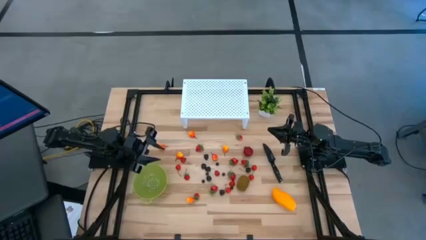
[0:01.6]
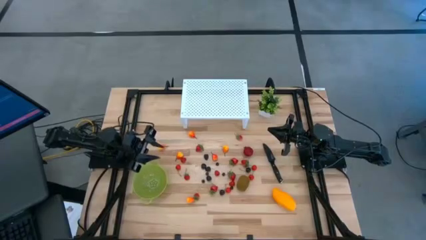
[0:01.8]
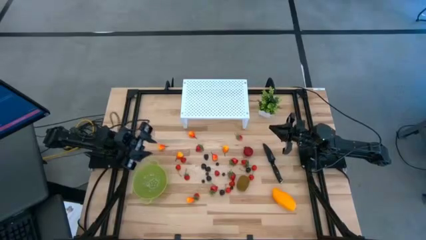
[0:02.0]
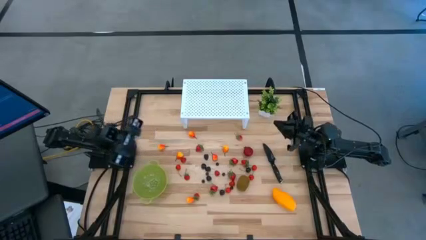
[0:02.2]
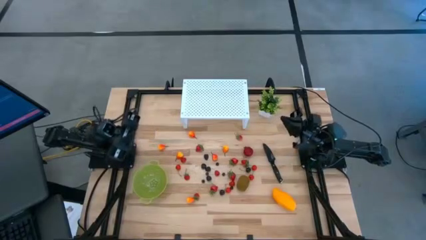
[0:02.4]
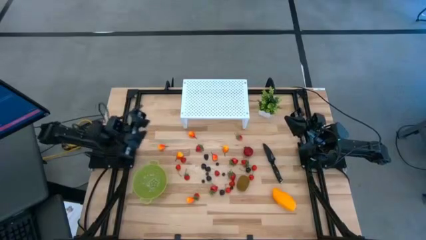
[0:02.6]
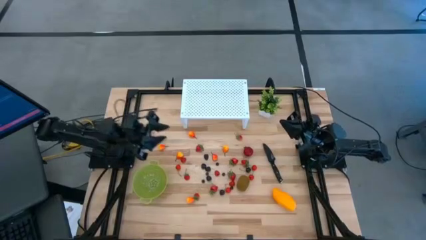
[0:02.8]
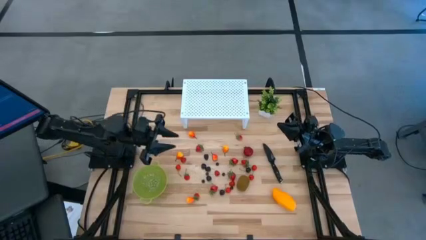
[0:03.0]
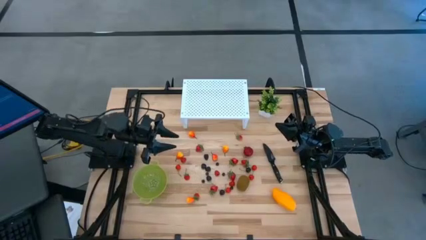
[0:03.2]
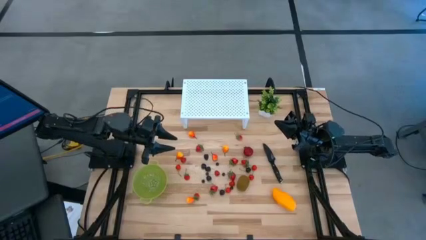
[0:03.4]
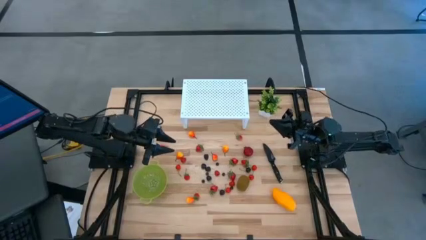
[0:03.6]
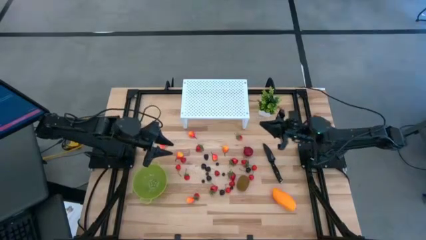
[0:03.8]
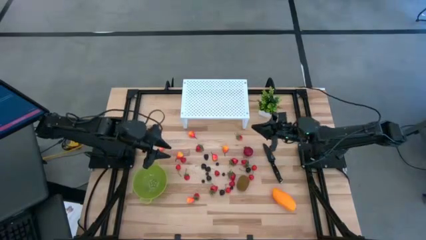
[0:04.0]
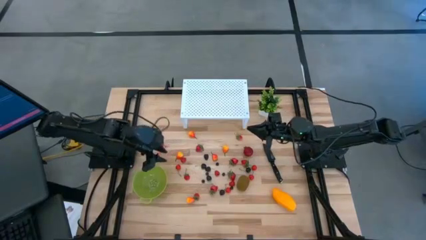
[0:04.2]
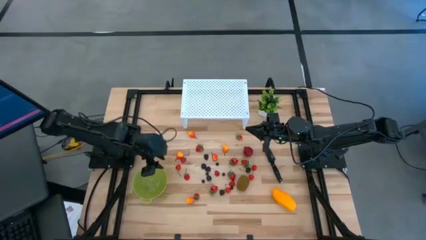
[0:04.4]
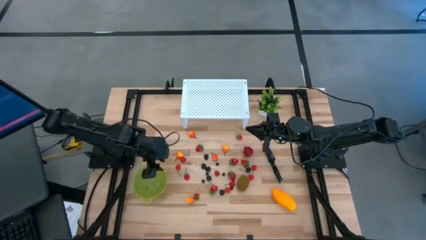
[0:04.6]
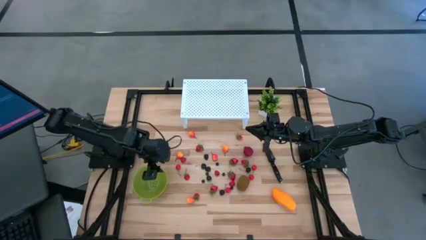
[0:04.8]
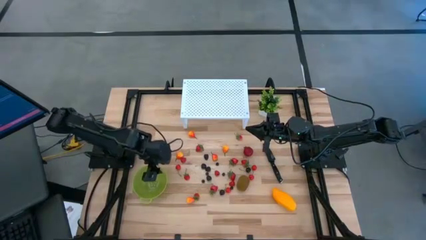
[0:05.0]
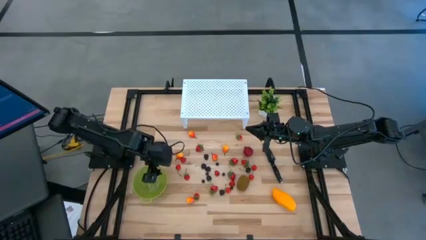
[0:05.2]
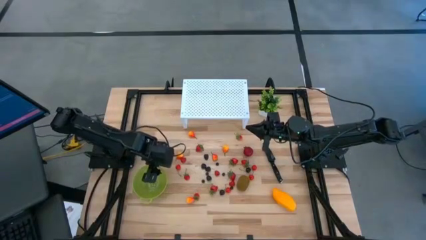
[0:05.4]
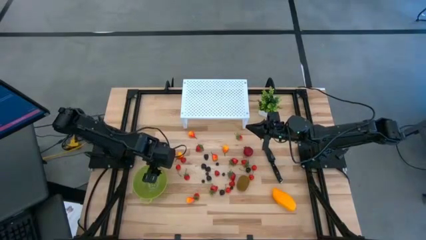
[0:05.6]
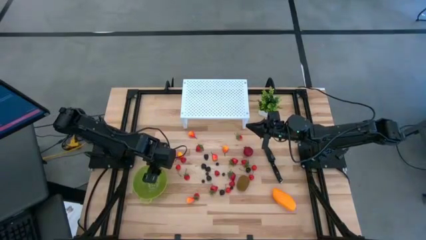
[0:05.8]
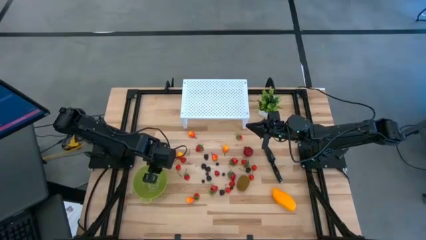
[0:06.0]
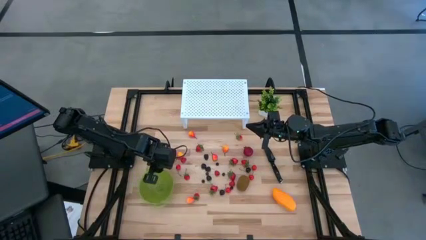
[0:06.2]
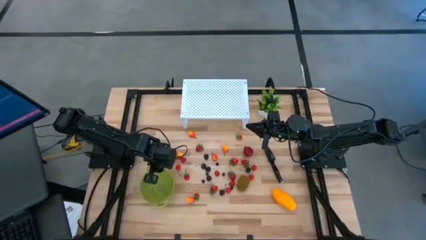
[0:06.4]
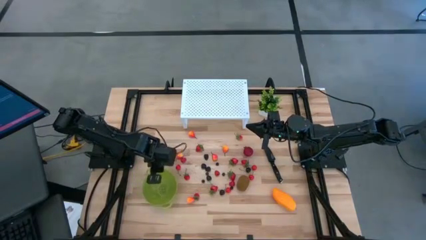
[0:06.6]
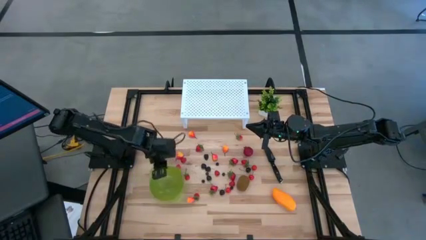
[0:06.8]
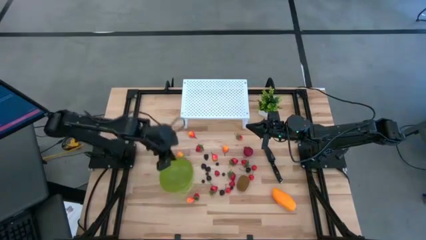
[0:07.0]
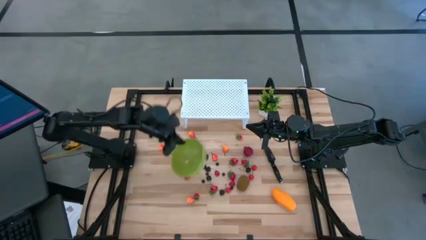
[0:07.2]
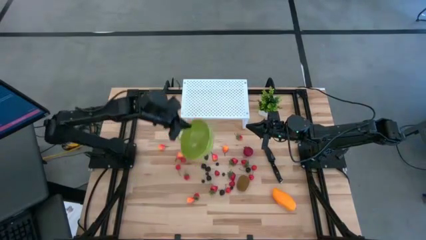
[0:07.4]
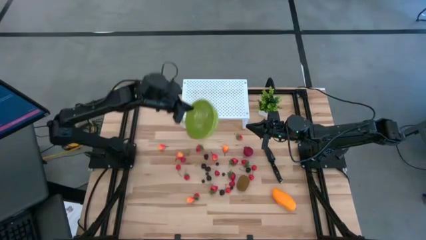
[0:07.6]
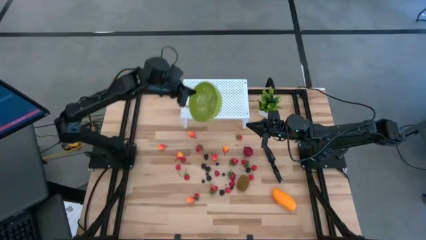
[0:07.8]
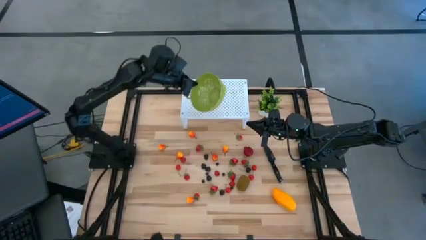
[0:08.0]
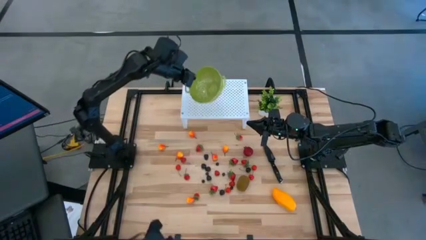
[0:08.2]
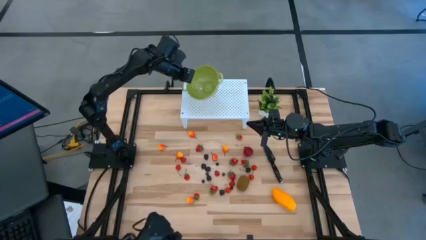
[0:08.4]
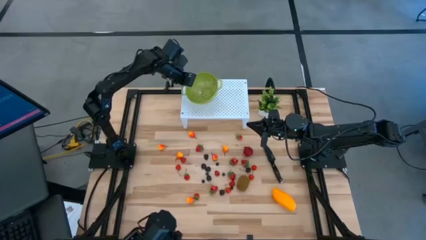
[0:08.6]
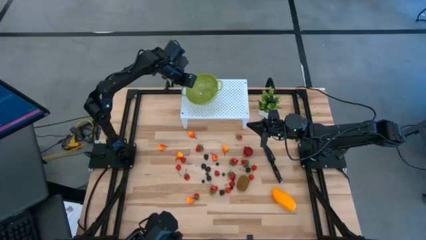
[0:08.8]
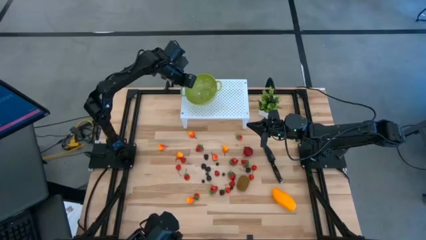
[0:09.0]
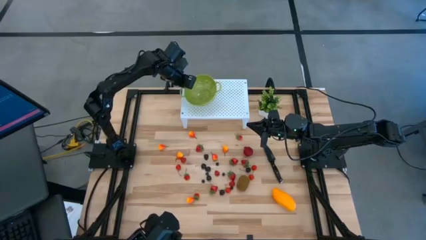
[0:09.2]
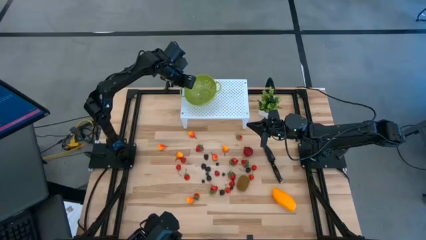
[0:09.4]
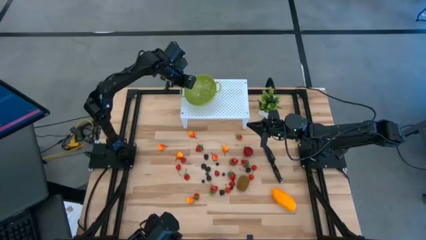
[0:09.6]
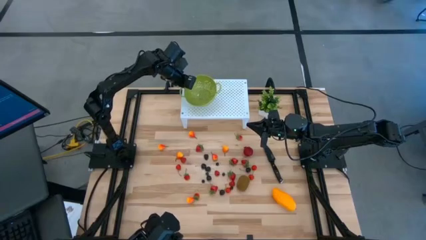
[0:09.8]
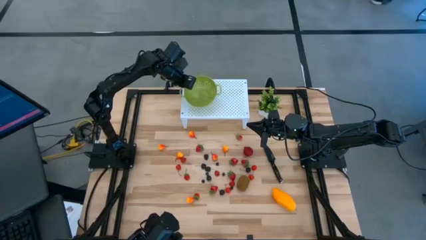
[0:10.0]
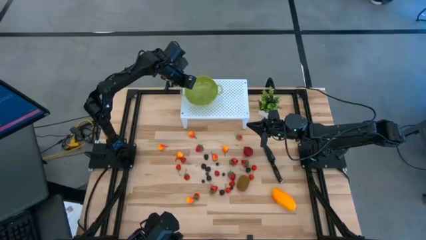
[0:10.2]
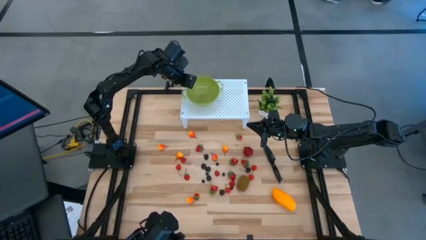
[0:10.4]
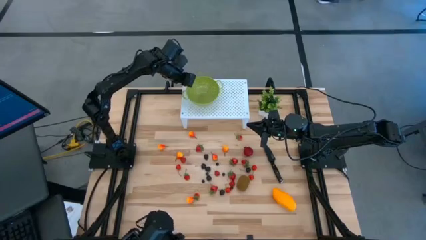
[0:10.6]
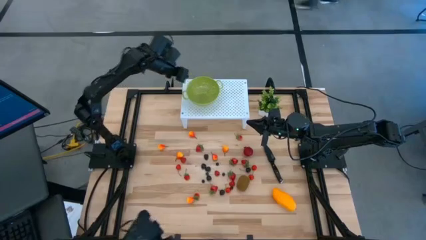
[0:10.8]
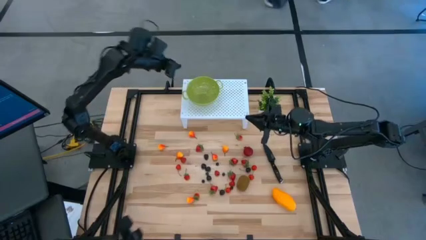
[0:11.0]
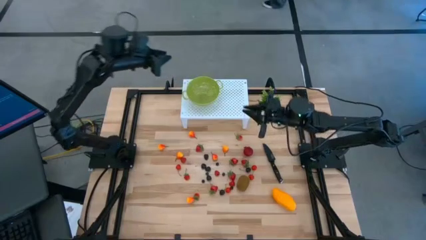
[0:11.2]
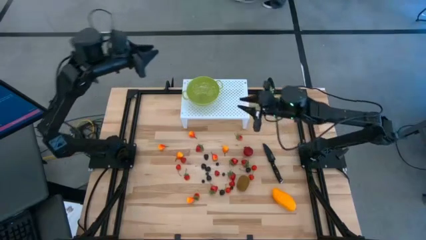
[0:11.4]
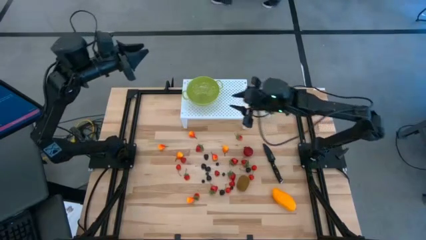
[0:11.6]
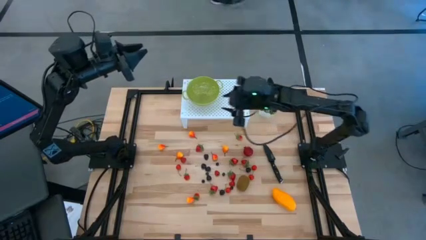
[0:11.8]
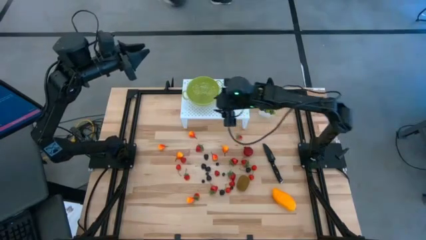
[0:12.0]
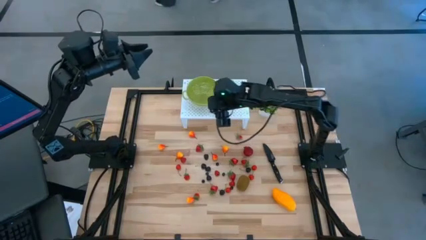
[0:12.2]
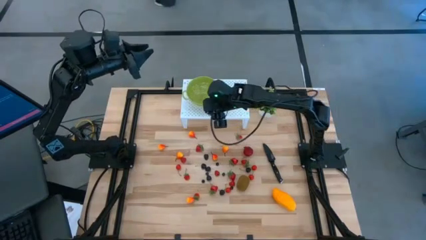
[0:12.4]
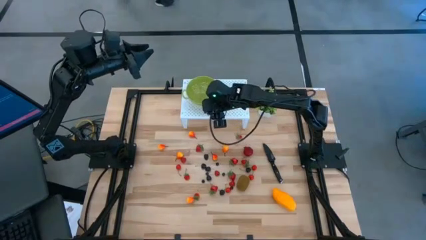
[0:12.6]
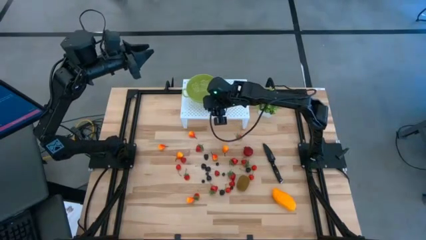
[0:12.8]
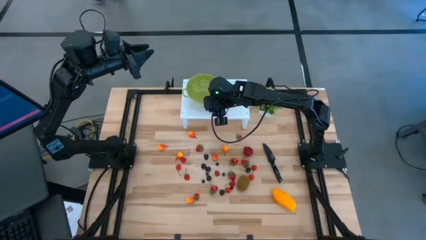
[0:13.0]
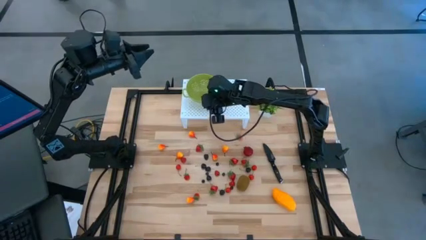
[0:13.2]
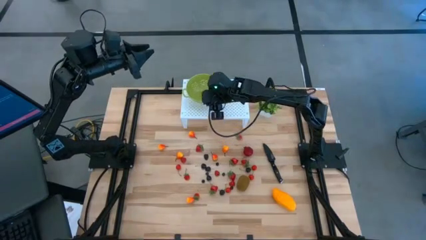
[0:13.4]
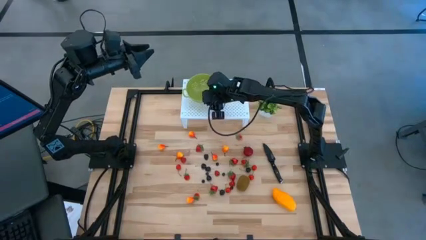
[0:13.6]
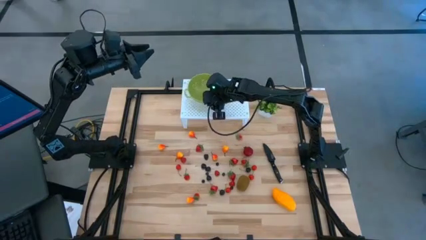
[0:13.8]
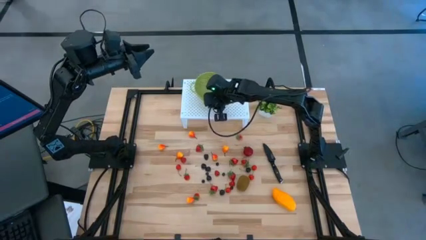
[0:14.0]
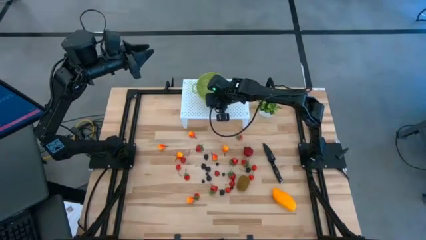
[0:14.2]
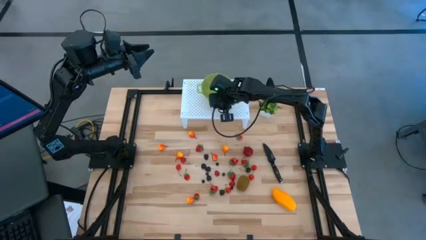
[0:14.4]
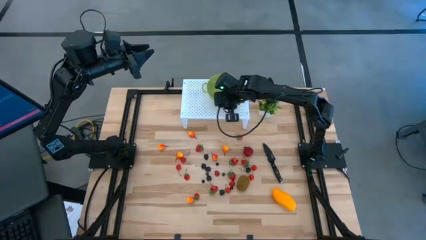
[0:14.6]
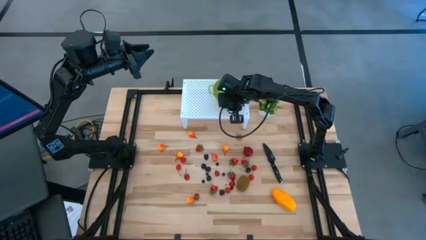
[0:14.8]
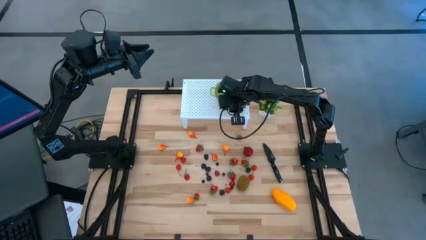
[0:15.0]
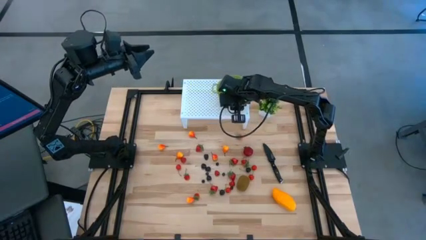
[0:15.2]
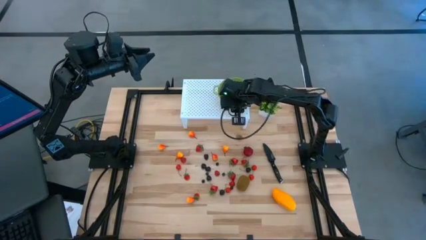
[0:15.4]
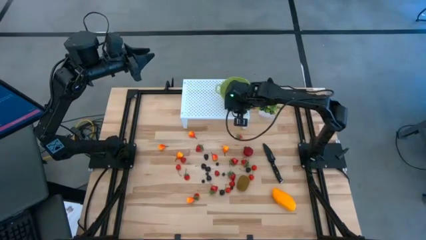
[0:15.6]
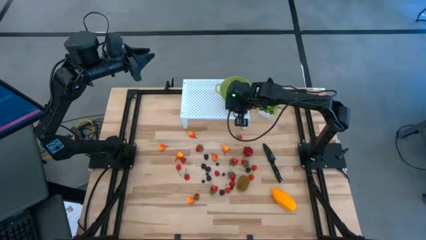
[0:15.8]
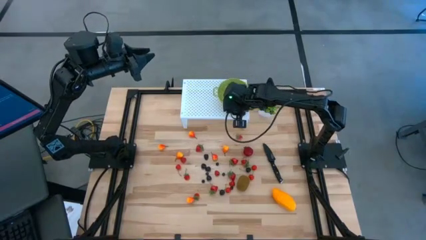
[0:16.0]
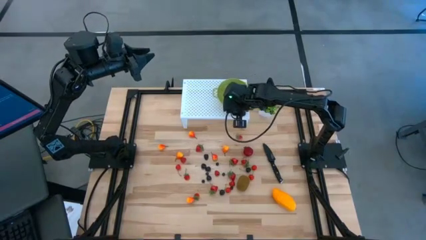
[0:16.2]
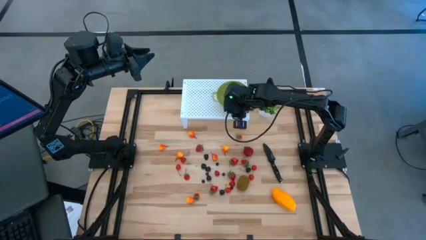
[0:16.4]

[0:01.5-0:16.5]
Task: Pick & Place Fruit
Put the green strainer bowl on the shelf
